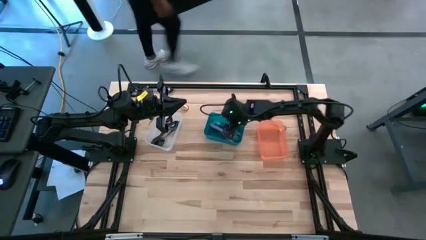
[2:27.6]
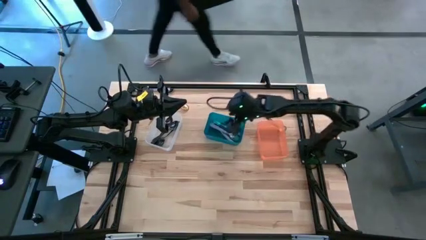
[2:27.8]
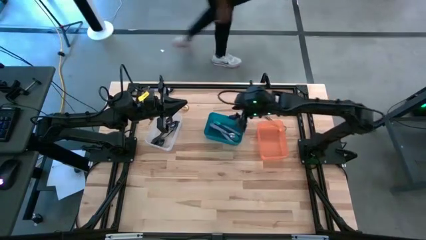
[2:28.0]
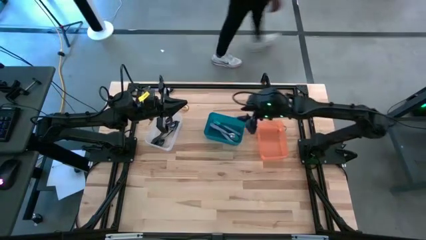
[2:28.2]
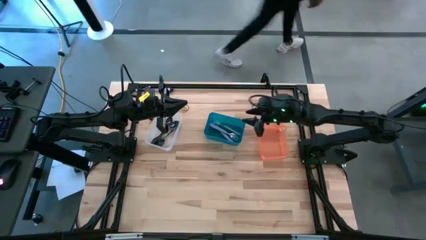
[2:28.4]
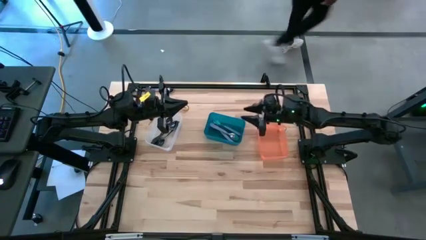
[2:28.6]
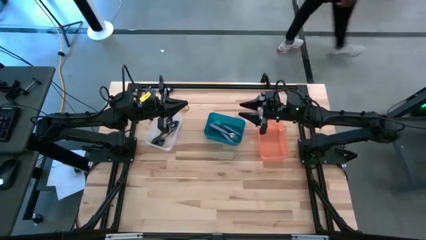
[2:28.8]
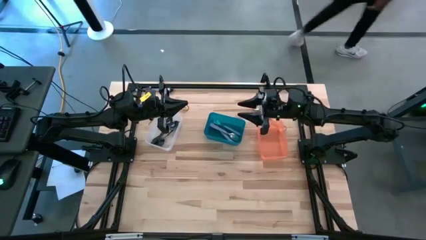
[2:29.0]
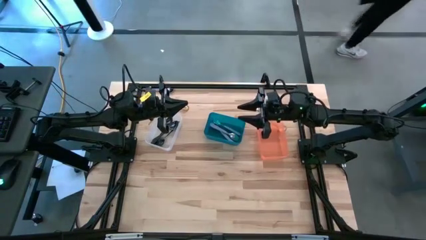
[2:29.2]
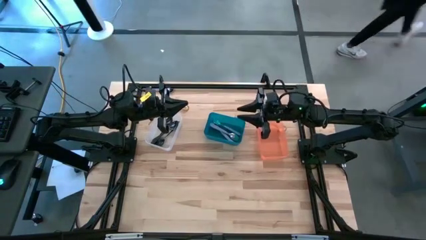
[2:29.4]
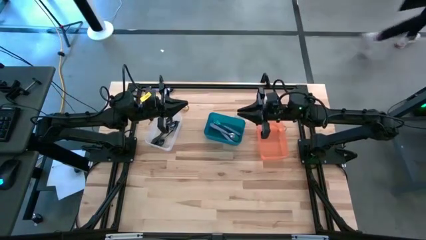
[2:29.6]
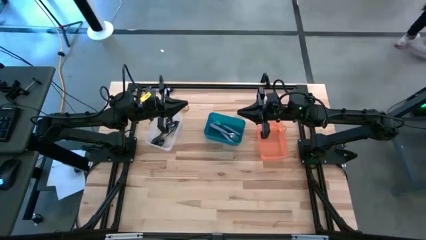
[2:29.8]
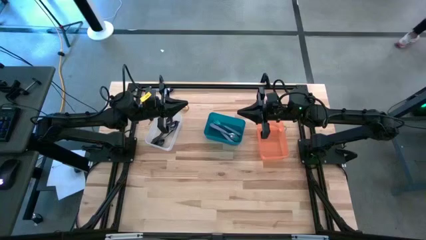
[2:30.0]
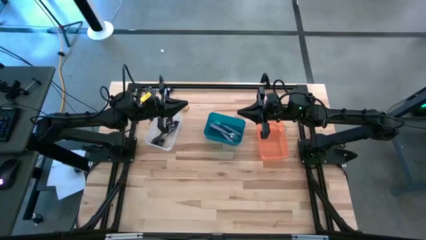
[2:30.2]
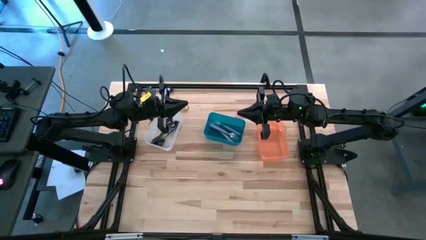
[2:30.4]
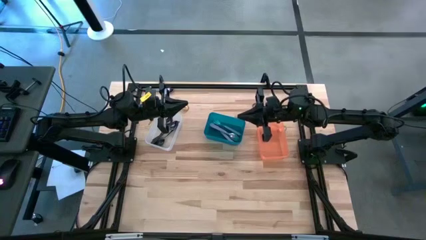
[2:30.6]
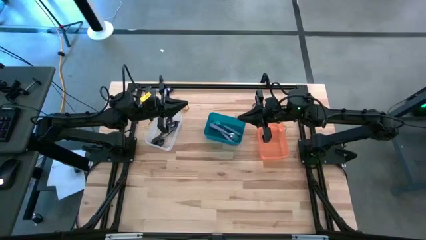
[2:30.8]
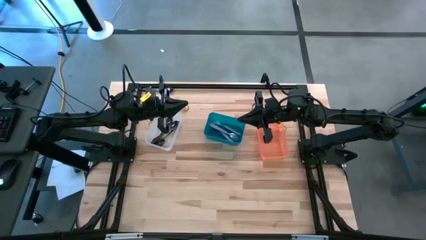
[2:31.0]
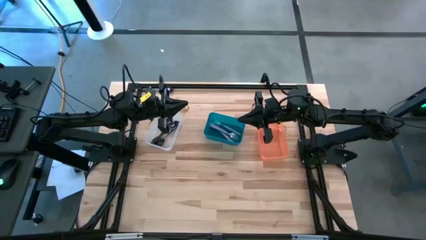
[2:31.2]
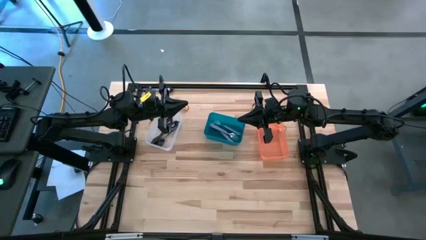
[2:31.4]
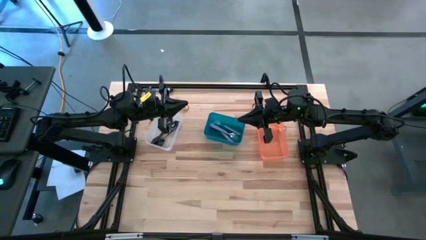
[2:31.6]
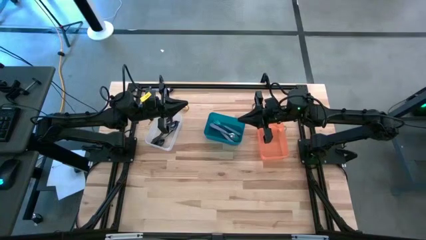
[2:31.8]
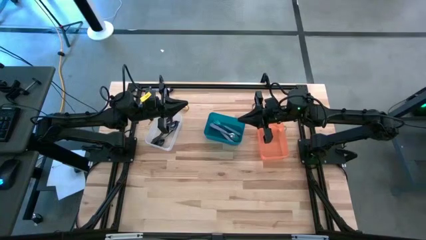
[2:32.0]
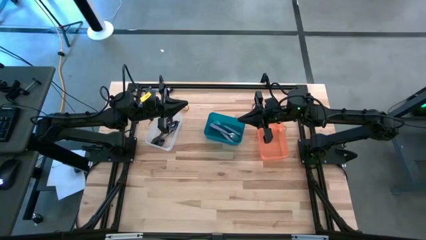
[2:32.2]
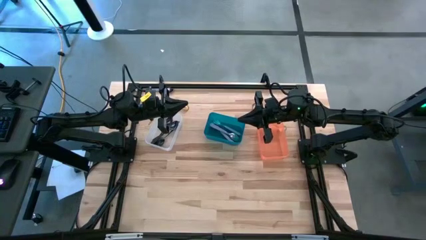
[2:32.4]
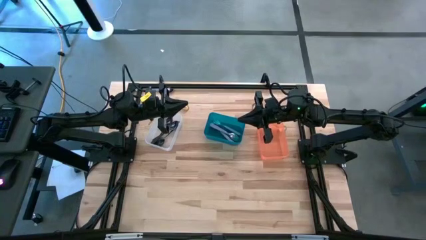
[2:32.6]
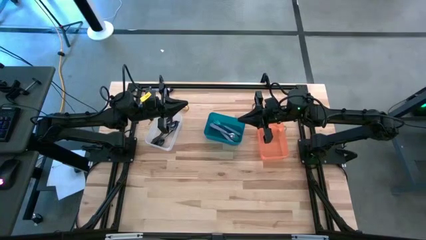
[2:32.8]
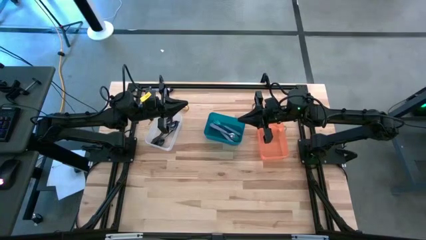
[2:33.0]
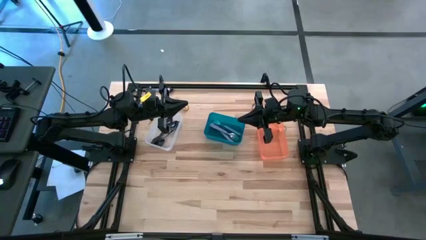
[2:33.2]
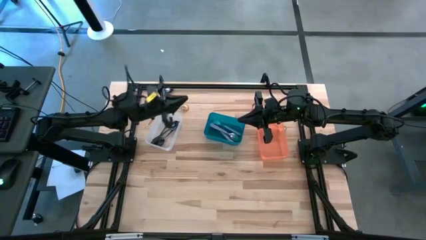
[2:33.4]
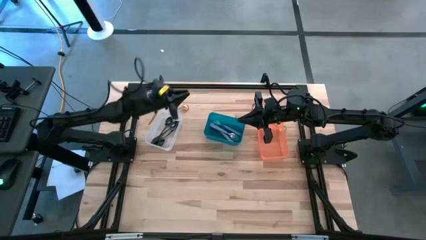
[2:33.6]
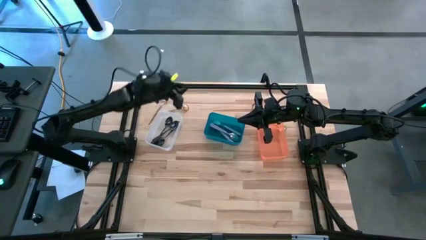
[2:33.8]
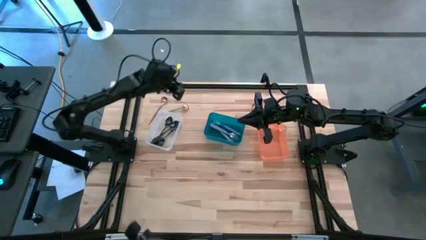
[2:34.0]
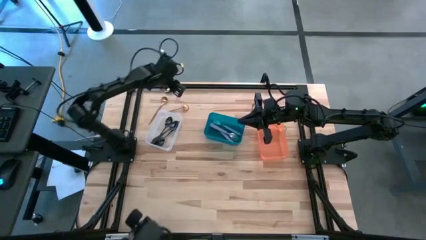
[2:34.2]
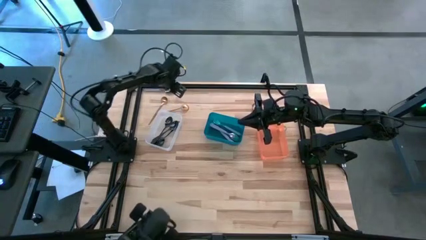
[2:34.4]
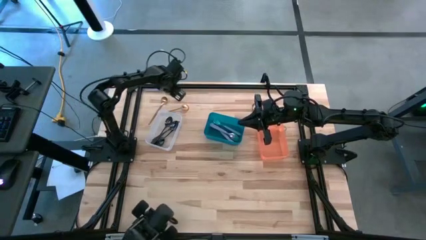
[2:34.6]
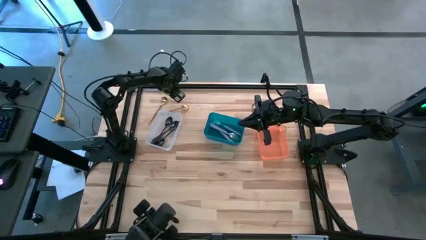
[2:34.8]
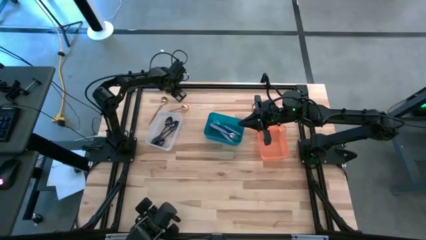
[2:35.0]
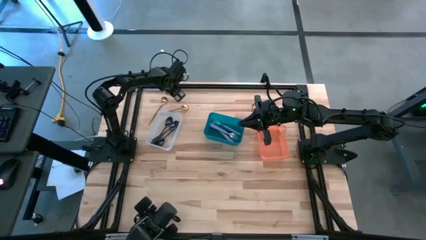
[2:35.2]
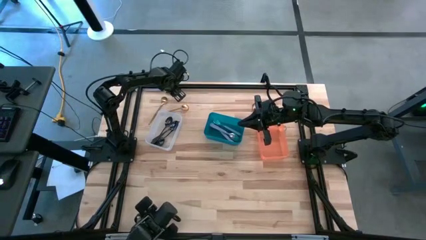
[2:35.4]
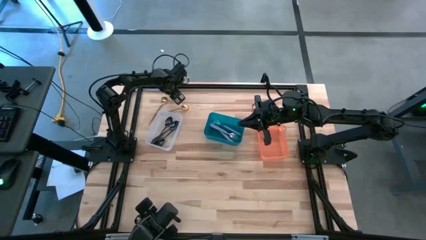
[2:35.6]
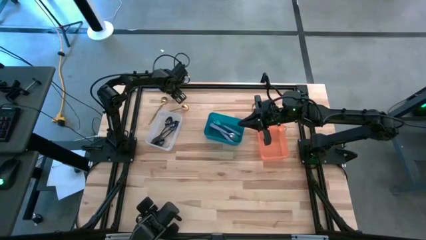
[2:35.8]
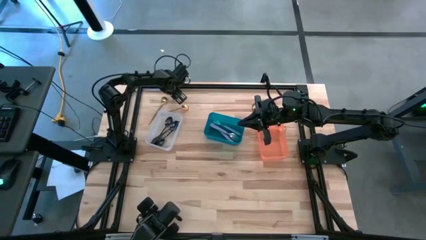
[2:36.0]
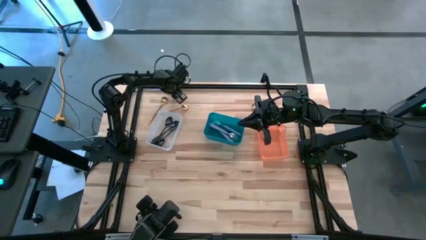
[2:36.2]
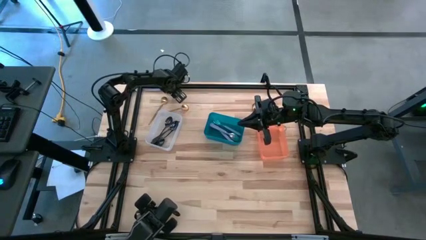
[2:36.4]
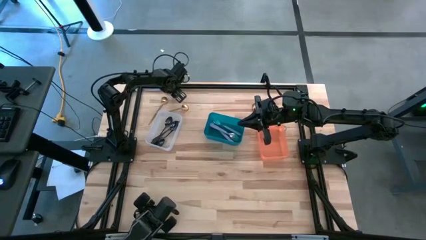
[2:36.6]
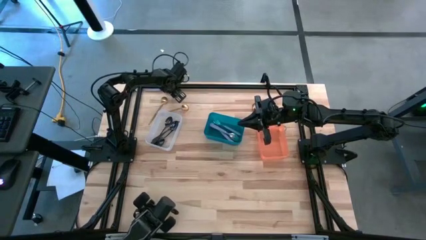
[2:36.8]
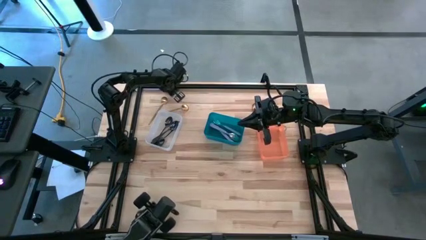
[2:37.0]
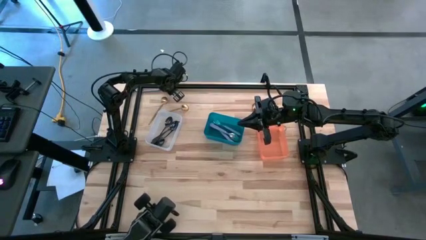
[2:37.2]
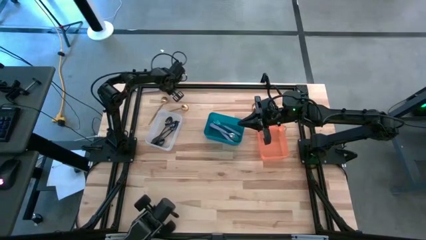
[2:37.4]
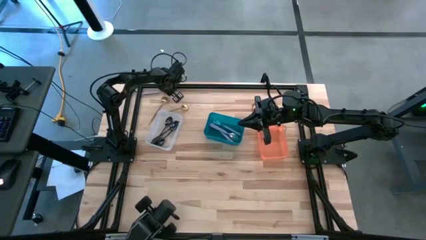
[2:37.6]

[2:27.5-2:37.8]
Task: Sort silverware by color (type)
Put the purple spoon into the blue bin
